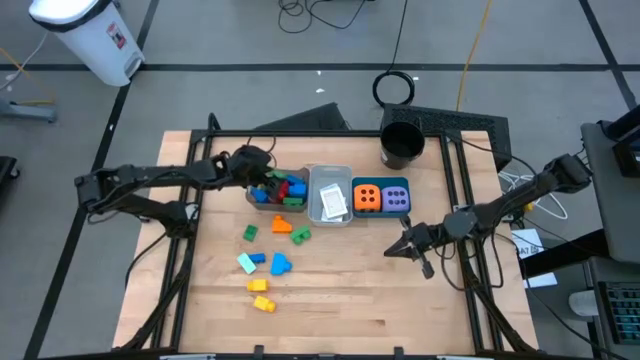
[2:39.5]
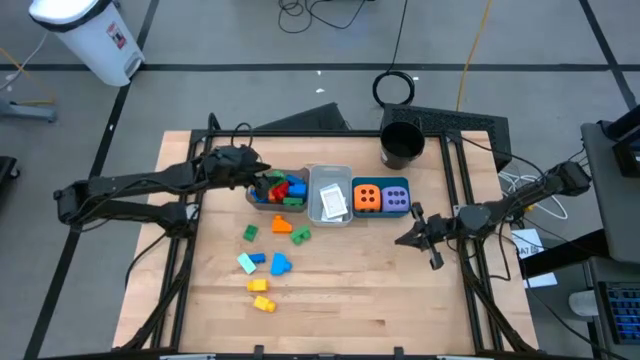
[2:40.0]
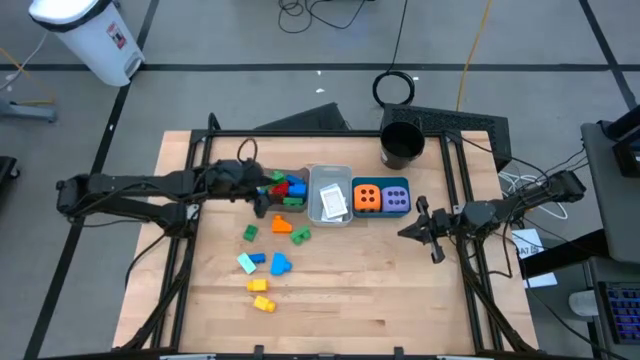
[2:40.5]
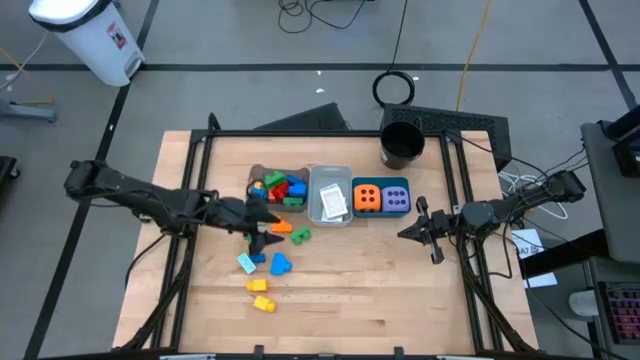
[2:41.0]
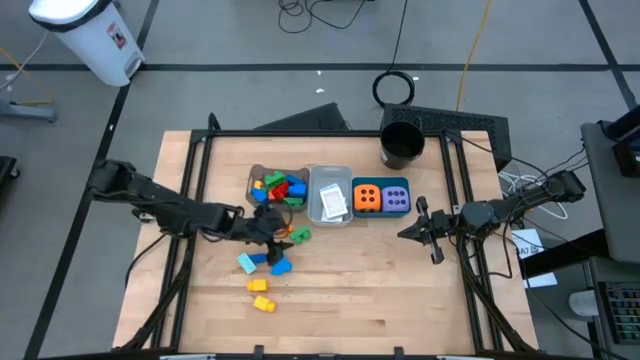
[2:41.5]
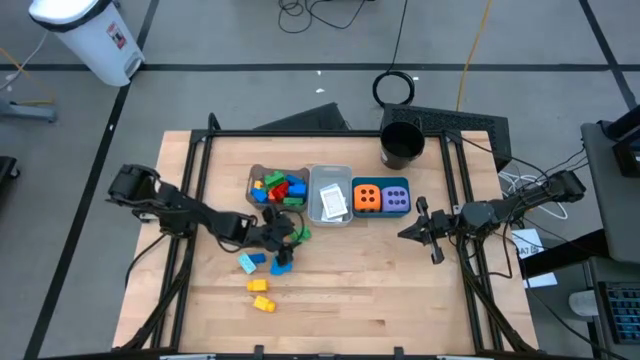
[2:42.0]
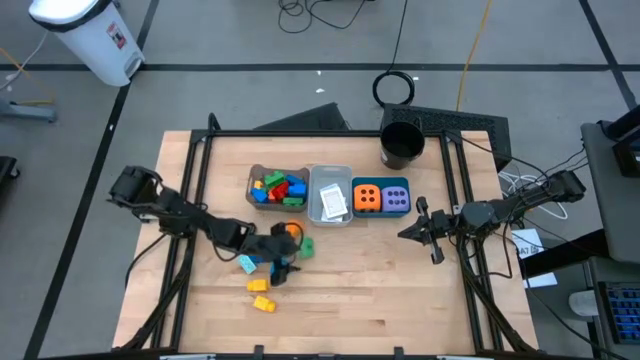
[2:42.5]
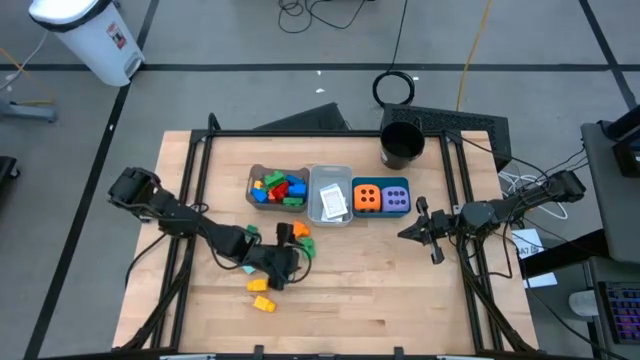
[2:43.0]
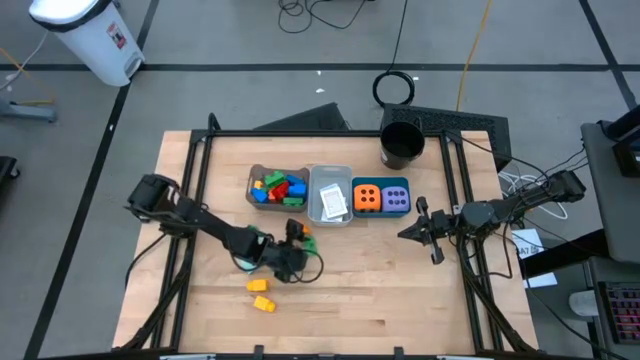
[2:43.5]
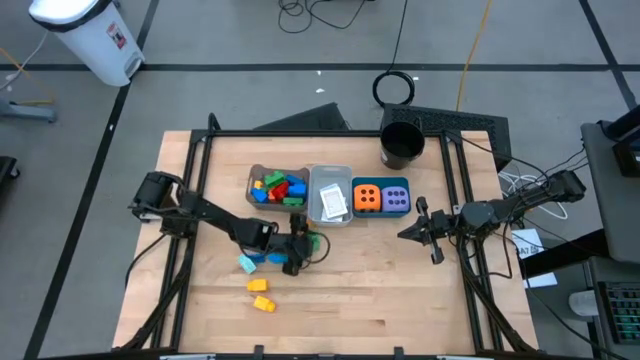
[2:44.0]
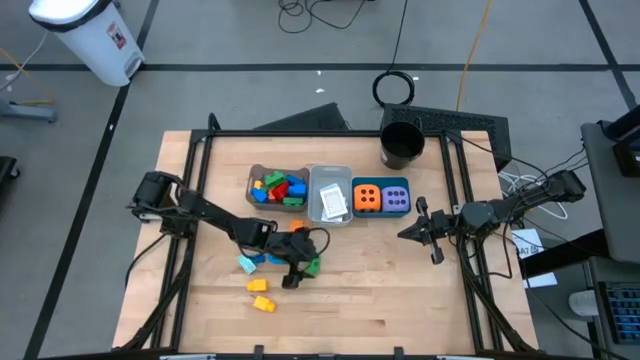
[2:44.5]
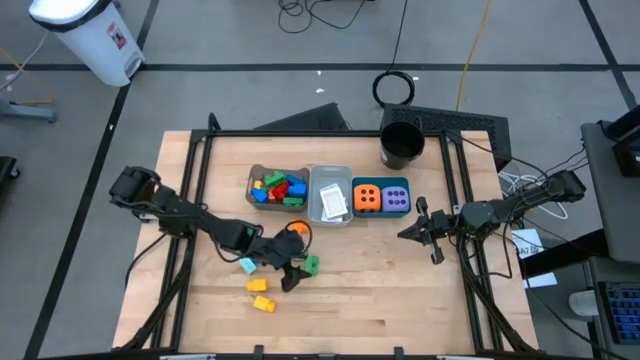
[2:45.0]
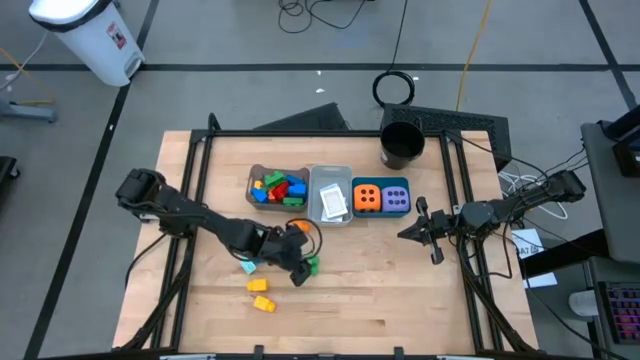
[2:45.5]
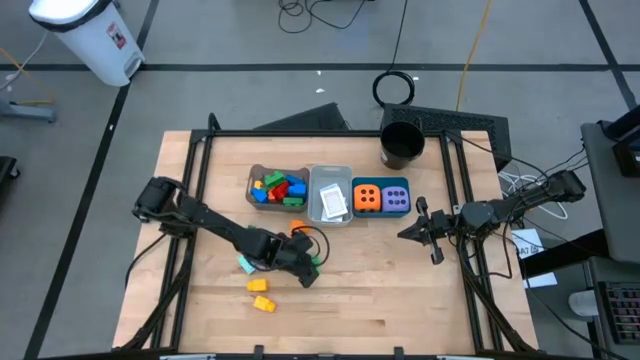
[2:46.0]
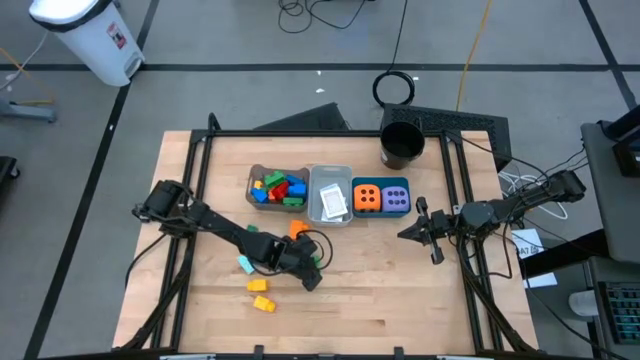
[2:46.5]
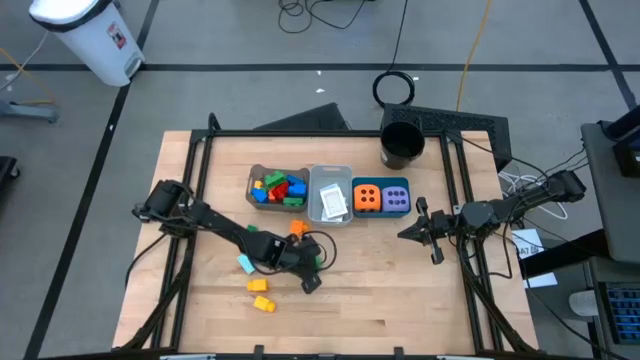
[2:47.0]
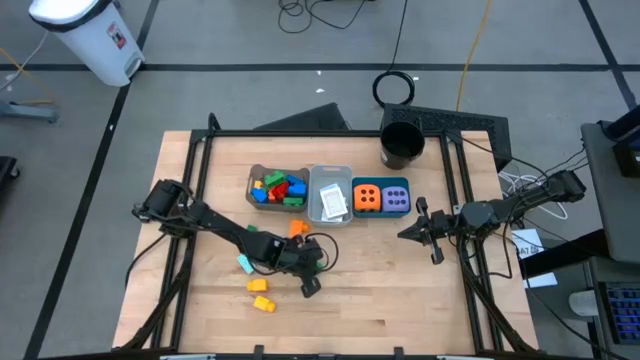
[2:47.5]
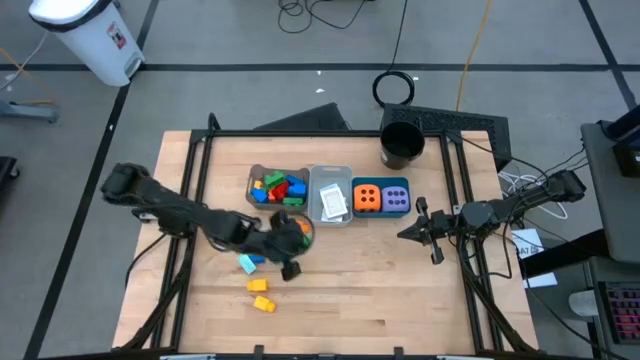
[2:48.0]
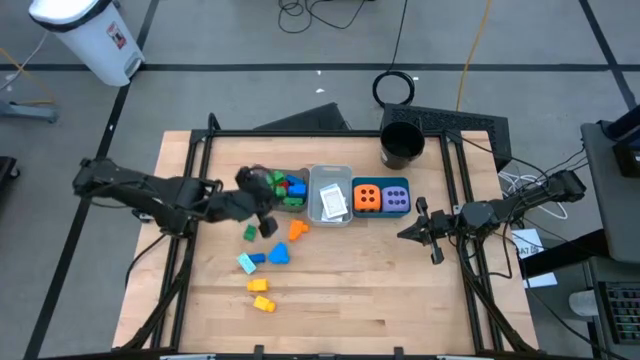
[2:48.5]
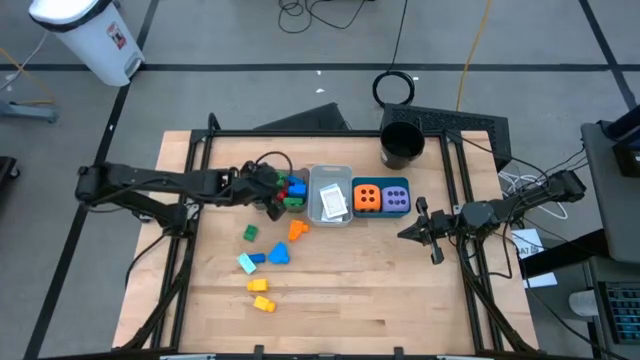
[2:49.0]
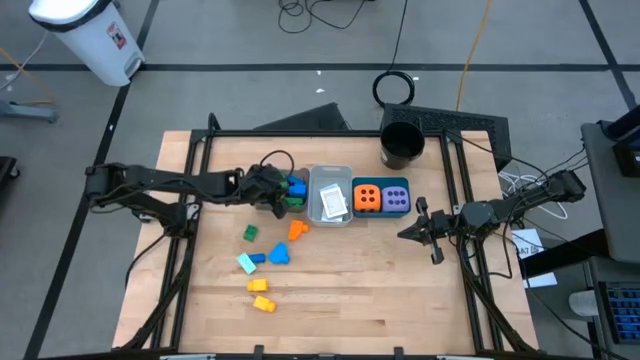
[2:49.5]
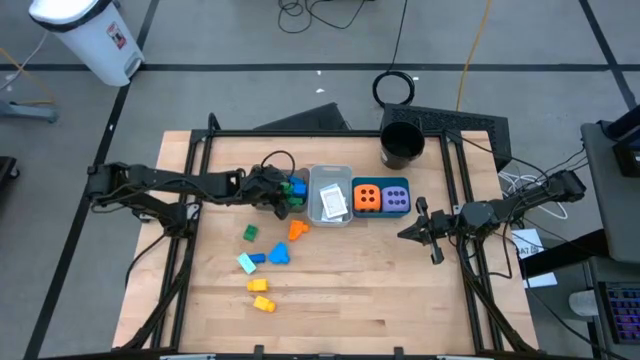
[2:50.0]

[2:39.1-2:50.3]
Task: Pick & Place Toys
Put the green game piece into the black bin

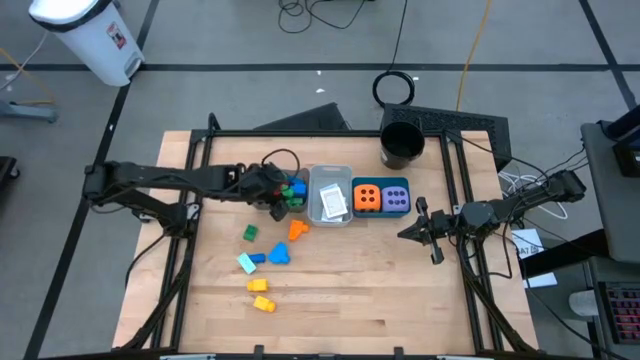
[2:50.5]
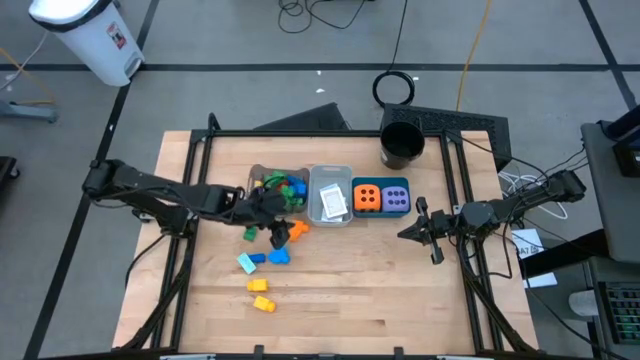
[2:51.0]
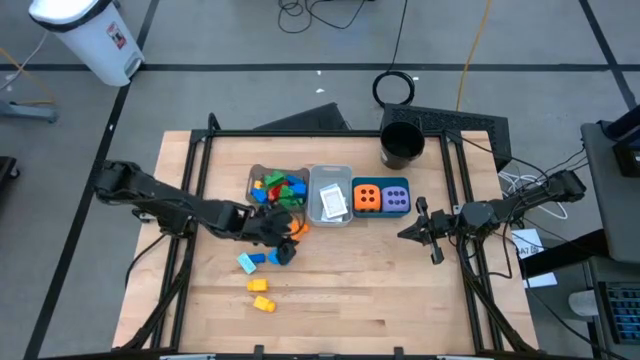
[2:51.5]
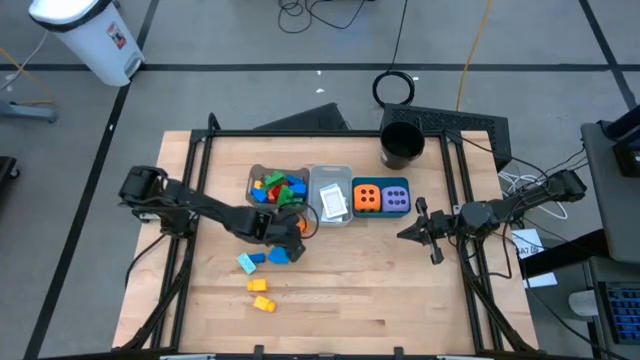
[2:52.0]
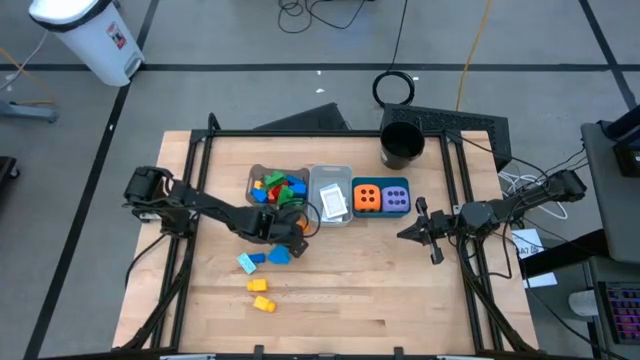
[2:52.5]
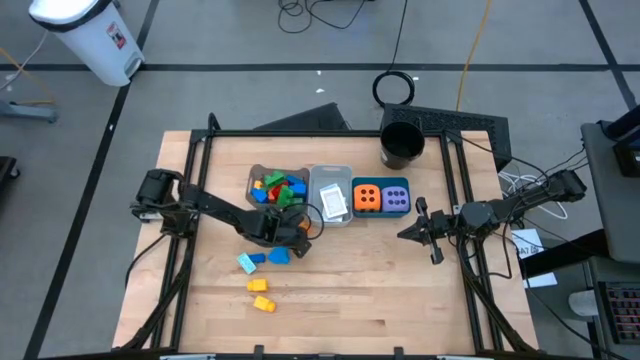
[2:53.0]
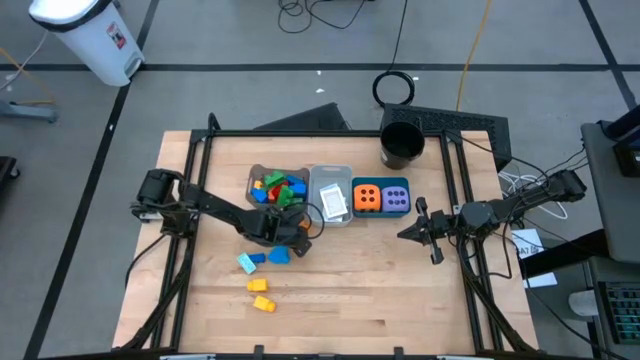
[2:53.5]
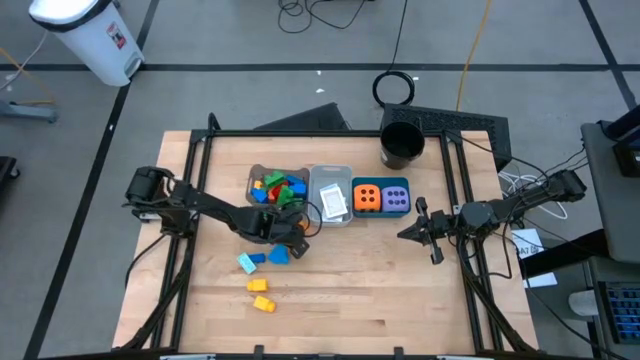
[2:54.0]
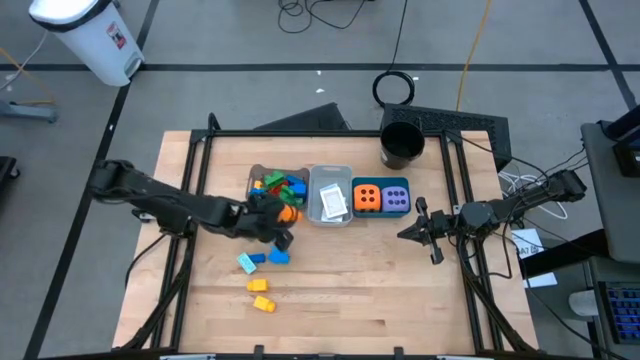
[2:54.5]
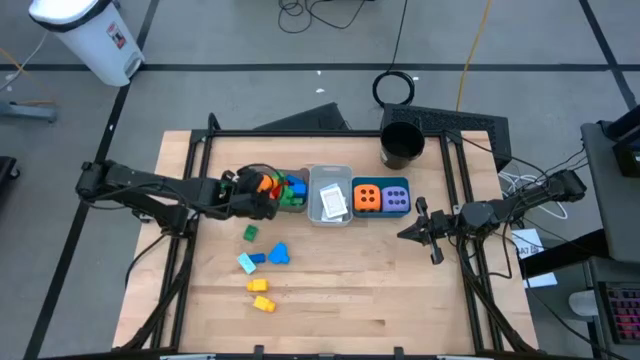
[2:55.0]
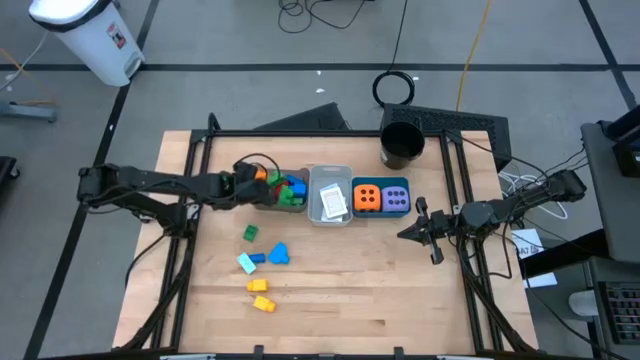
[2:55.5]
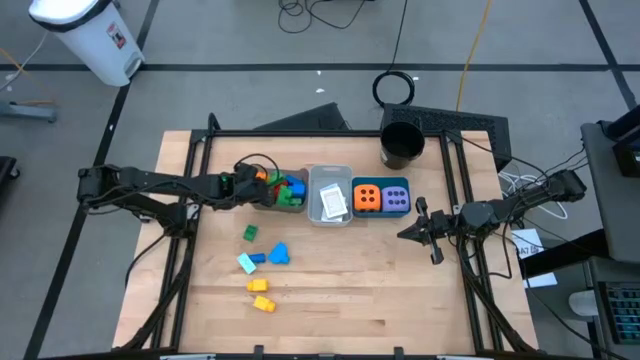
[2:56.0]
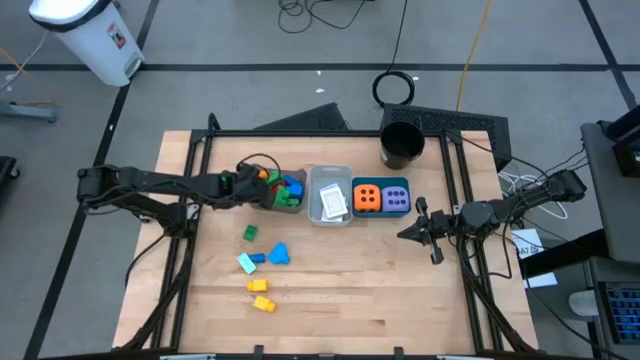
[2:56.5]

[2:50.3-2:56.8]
Put the orange game piece into the black bin

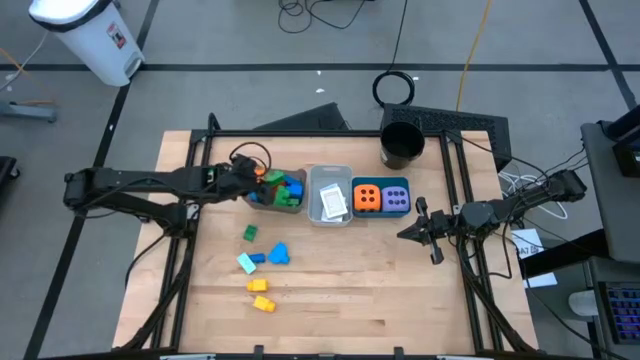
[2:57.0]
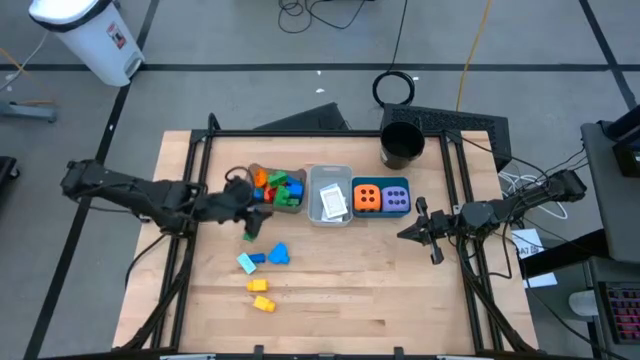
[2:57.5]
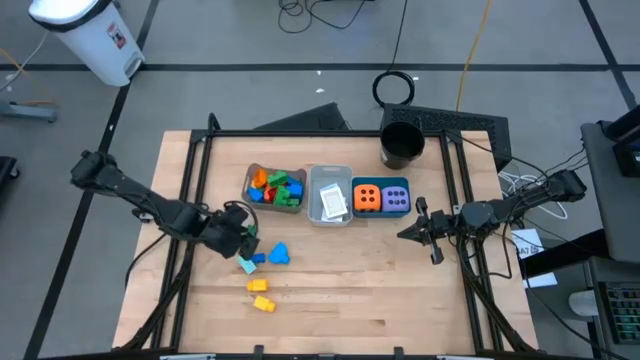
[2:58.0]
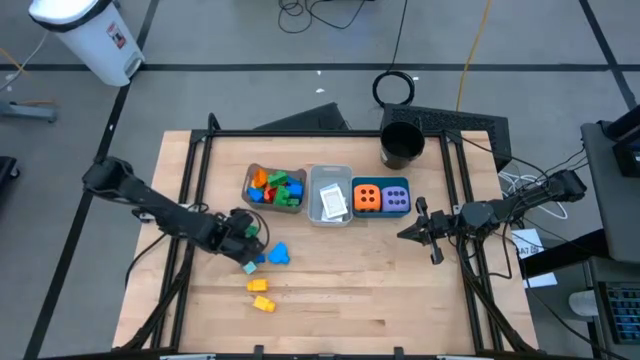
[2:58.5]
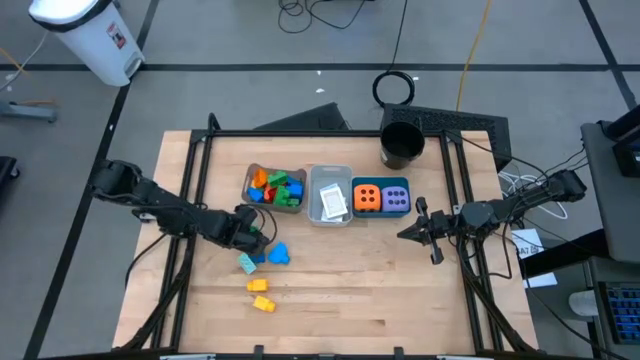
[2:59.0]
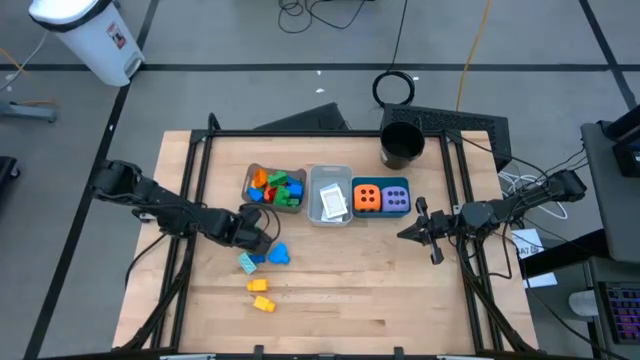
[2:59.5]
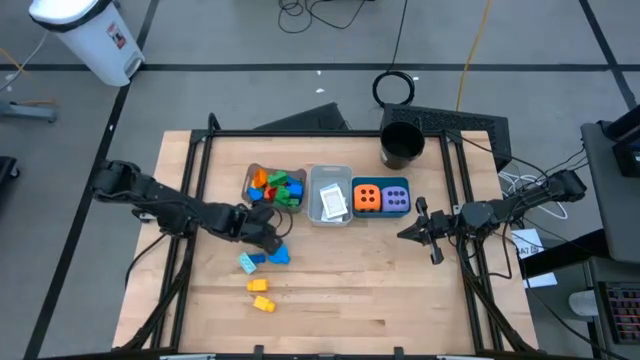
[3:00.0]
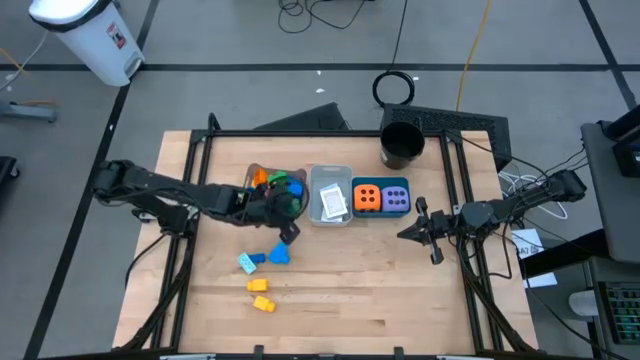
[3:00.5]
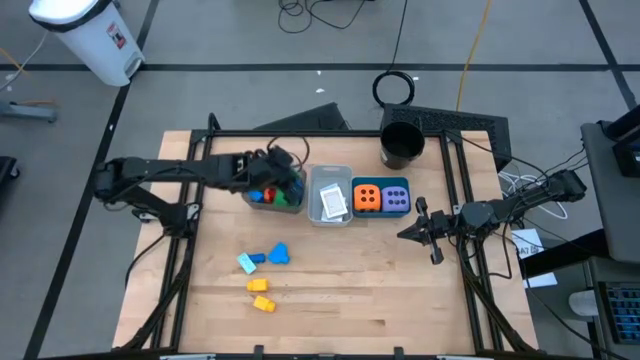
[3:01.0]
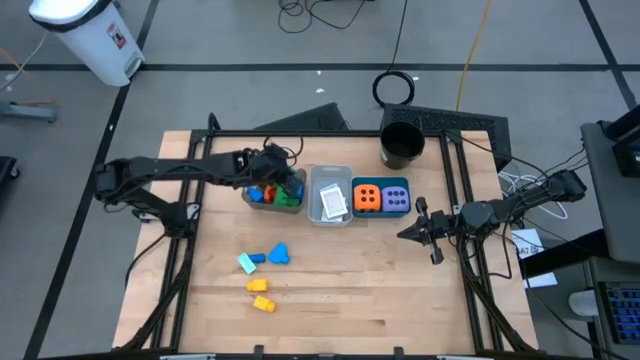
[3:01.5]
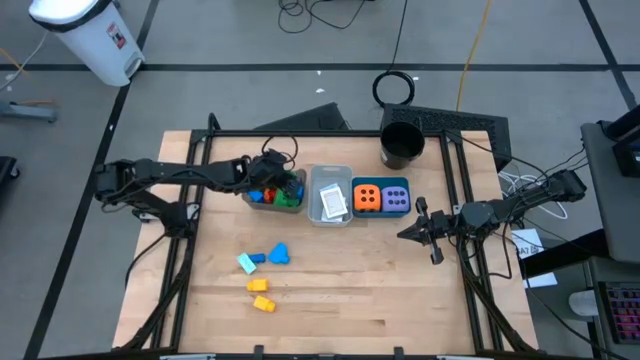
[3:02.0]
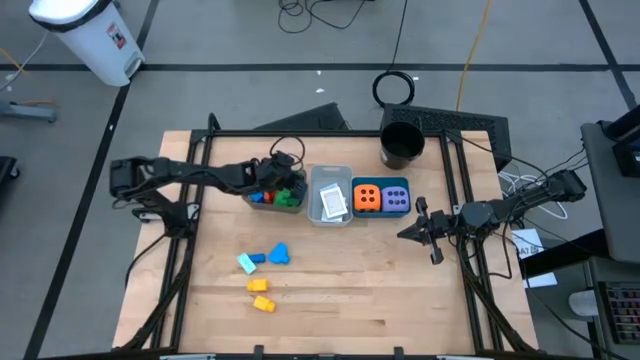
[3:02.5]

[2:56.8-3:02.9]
Put the green game piece into the black bin
